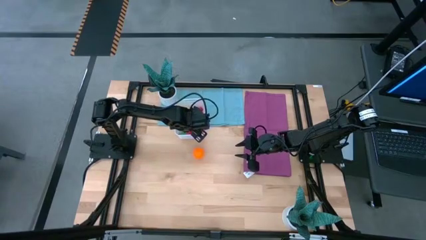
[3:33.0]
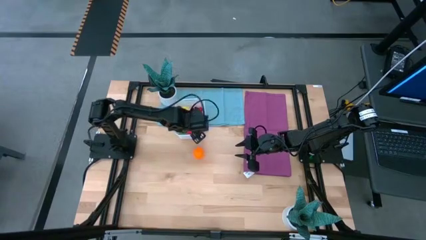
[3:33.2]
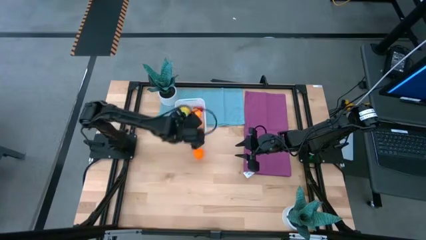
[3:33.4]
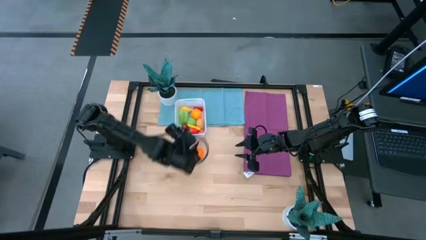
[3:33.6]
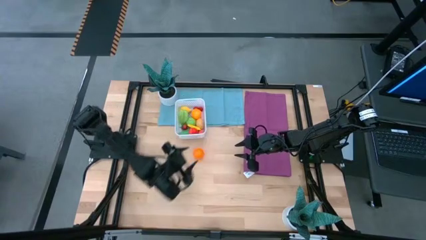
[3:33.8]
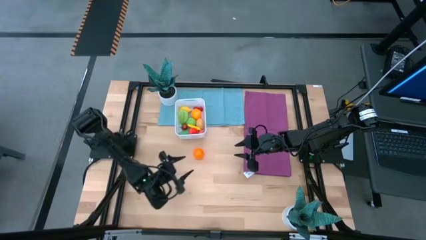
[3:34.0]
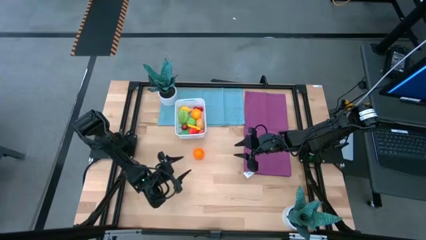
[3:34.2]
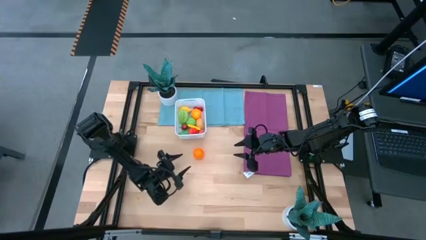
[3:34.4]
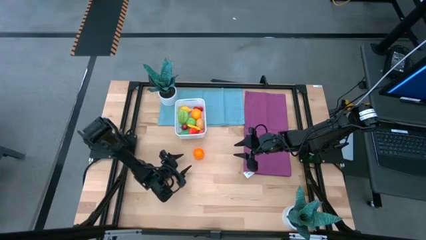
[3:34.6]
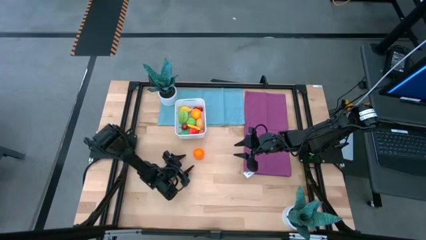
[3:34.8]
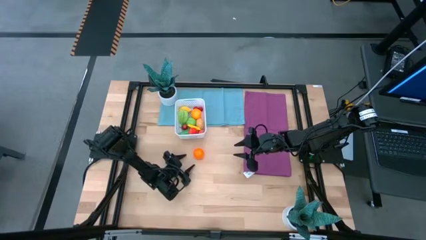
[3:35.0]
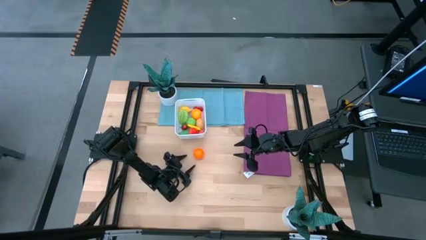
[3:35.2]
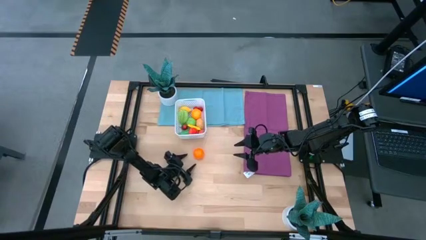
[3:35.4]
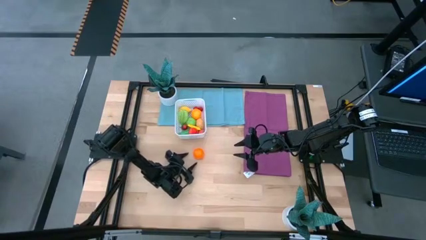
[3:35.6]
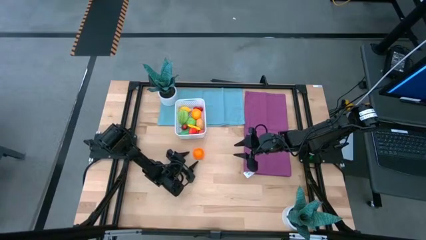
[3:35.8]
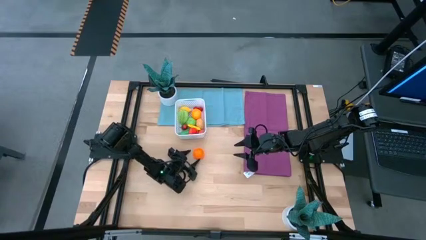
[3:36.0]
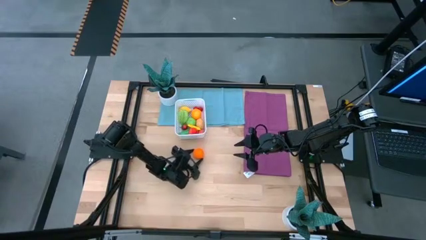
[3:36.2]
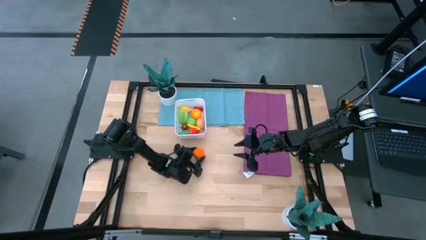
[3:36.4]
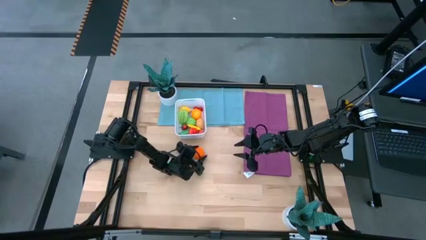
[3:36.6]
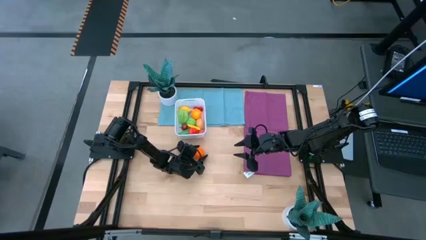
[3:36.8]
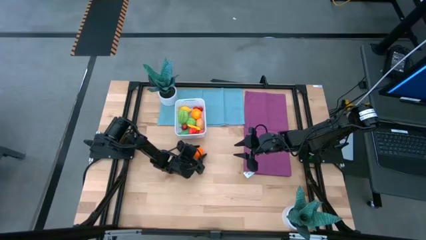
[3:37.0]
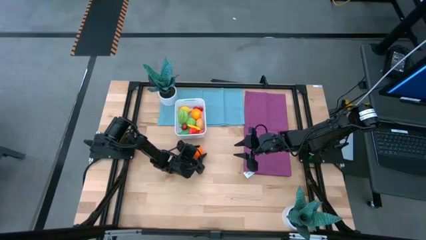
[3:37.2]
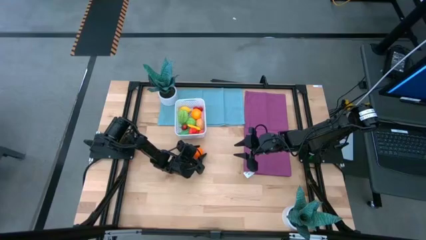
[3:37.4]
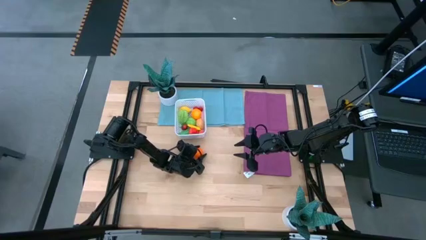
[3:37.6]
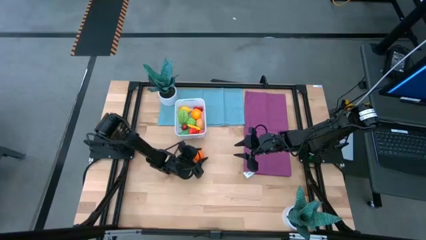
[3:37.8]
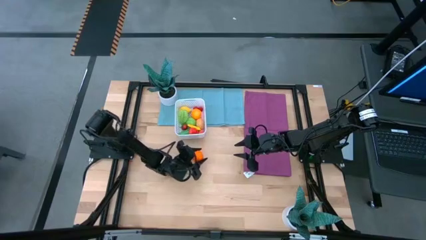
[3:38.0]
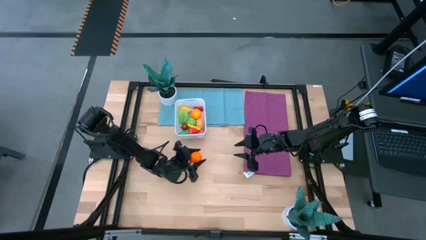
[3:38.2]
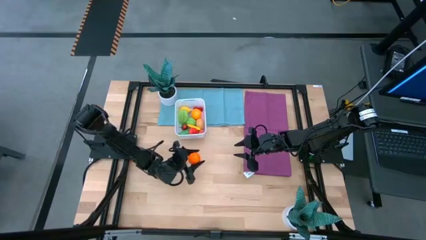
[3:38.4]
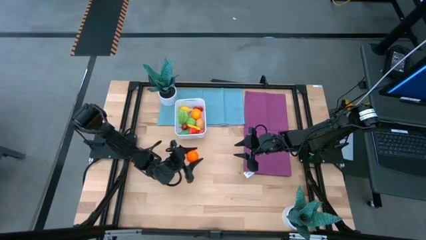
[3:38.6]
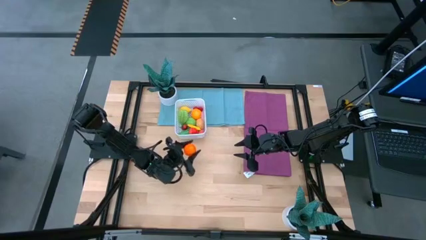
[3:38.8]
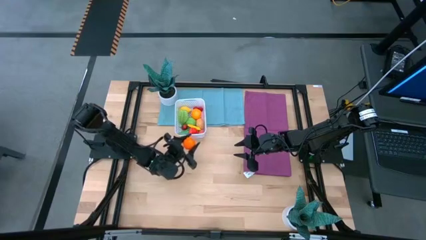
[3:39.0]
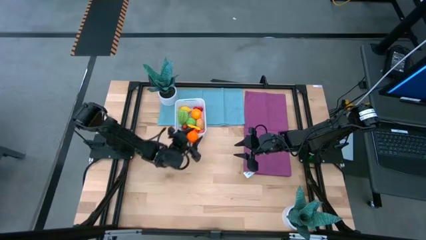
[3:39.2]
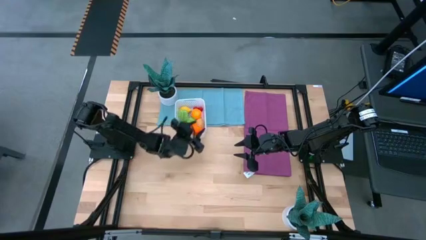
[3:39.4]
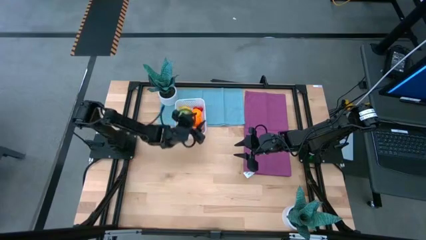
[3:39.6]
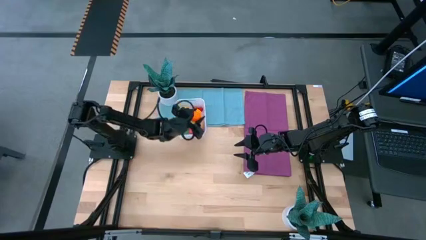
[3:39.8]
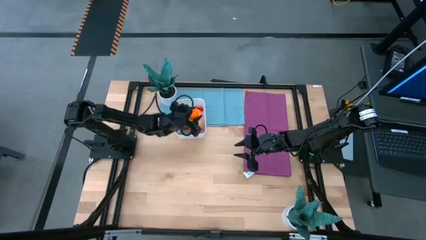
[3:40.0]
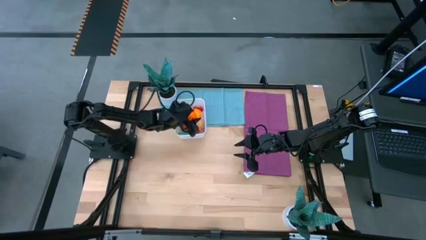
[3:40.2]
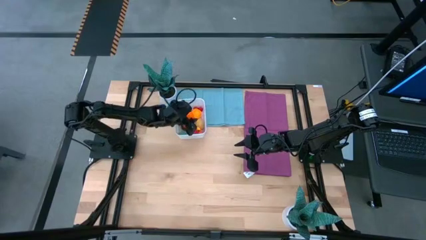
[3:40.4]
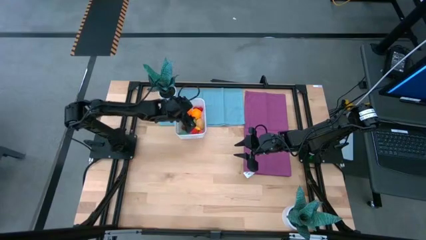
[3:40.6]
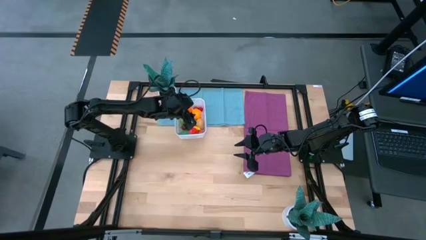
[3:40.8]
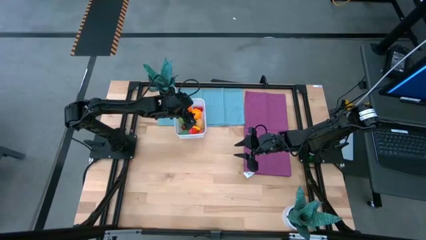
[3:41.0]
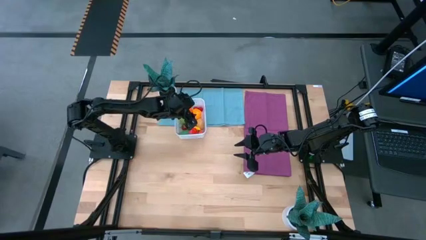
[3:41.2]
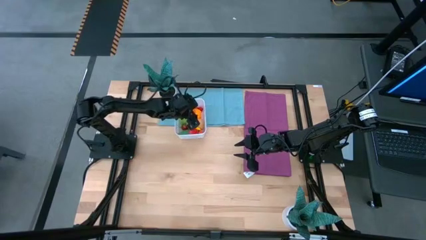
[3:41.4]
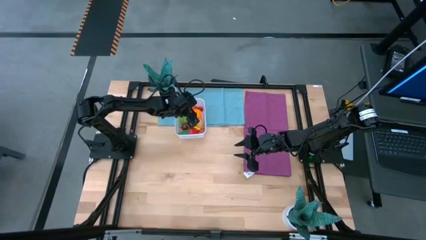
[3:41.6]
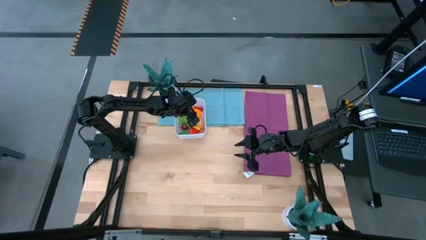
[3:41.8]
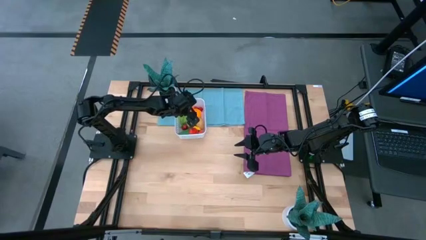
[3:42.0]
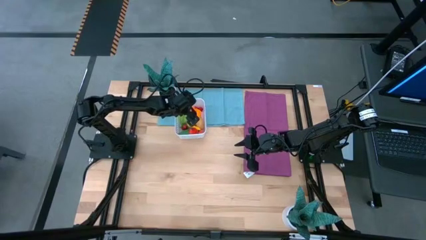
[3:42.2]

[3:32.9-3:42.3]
Task: Pick and placing Produce into tupperware
Put the orange pumpkin into the white basket

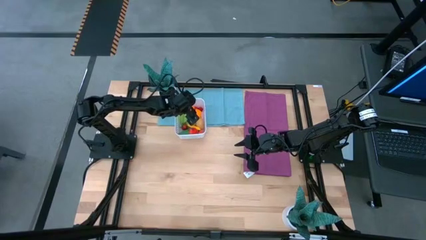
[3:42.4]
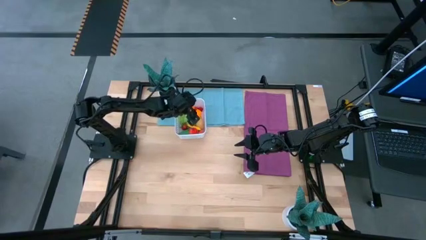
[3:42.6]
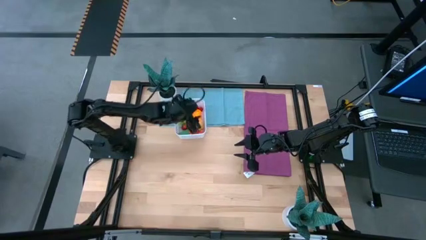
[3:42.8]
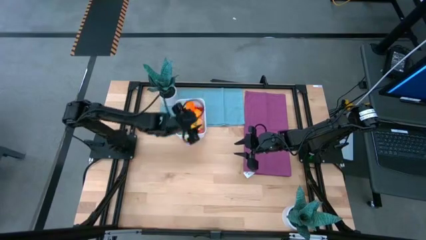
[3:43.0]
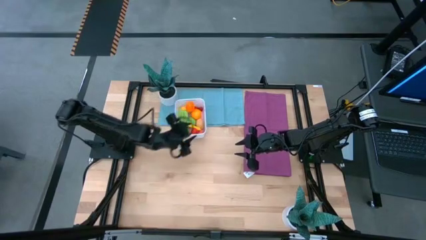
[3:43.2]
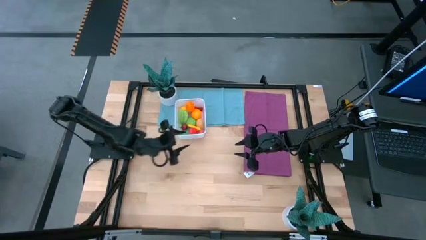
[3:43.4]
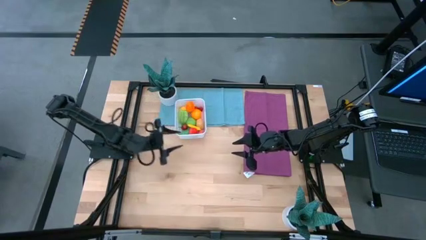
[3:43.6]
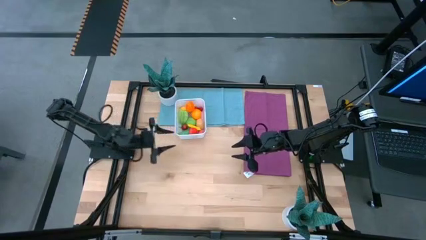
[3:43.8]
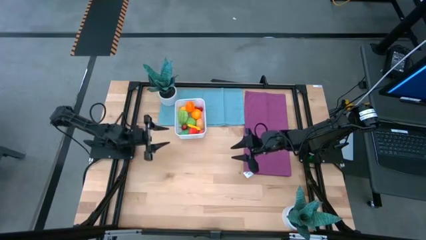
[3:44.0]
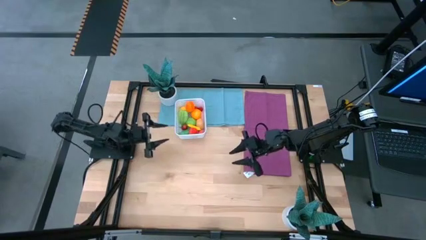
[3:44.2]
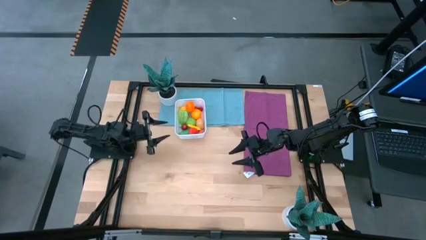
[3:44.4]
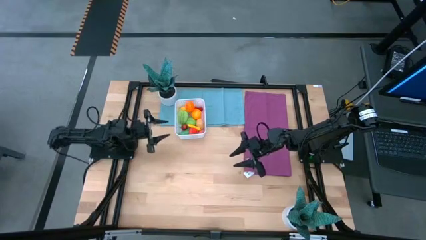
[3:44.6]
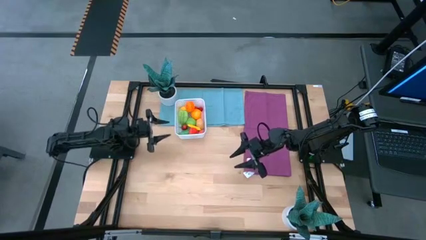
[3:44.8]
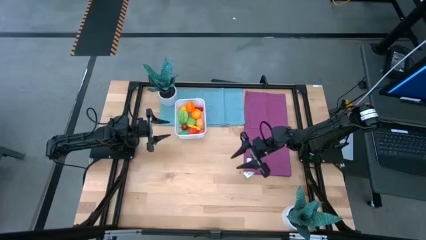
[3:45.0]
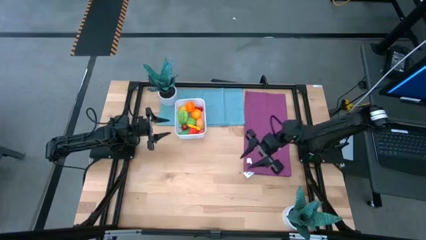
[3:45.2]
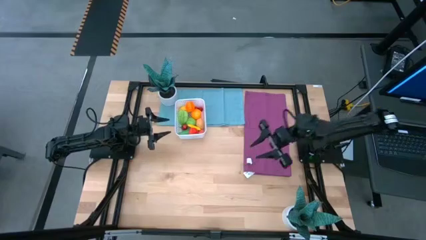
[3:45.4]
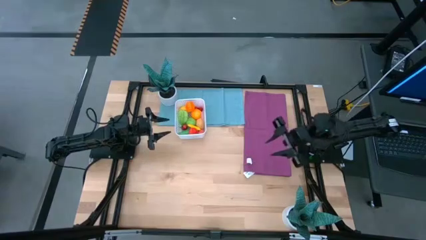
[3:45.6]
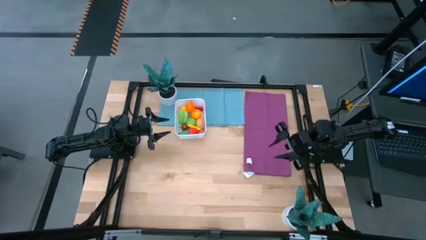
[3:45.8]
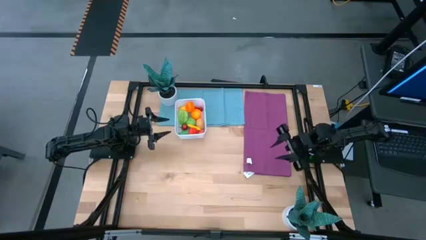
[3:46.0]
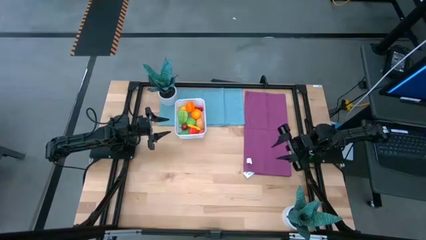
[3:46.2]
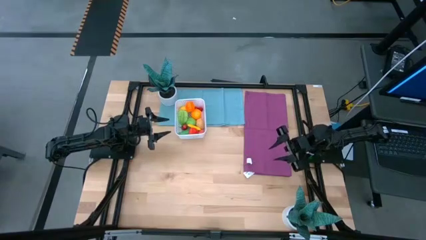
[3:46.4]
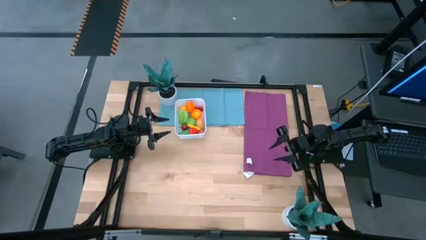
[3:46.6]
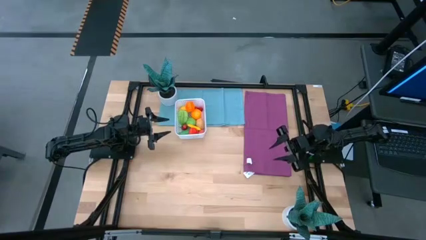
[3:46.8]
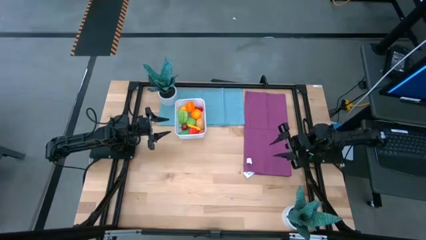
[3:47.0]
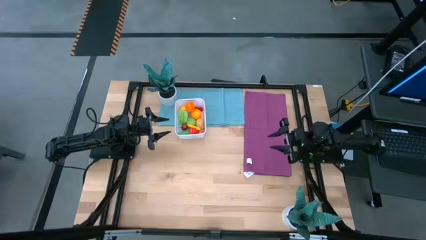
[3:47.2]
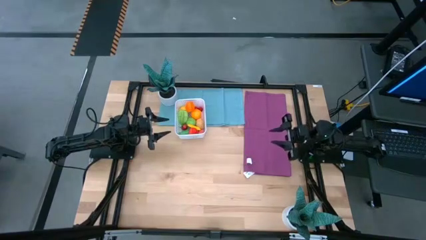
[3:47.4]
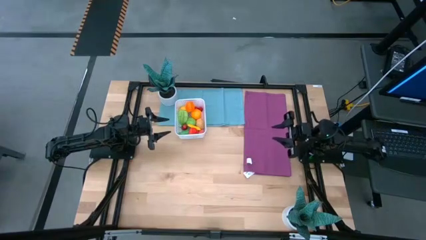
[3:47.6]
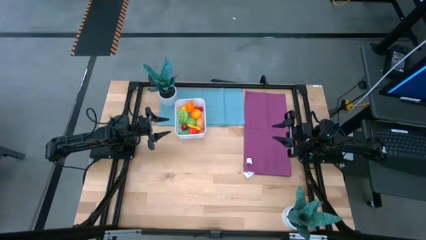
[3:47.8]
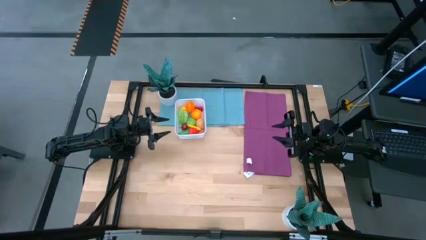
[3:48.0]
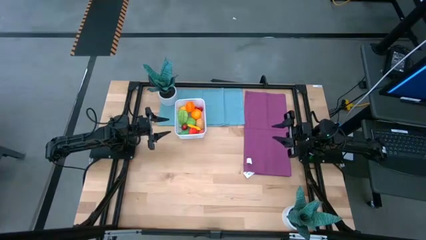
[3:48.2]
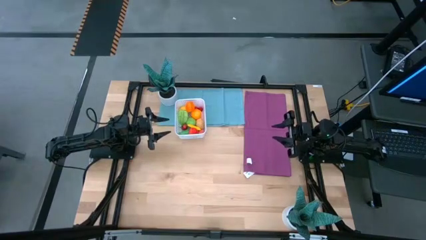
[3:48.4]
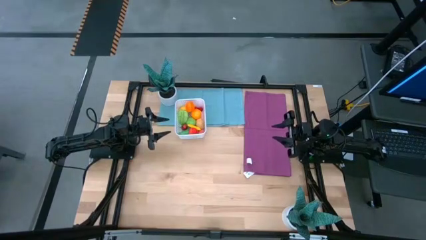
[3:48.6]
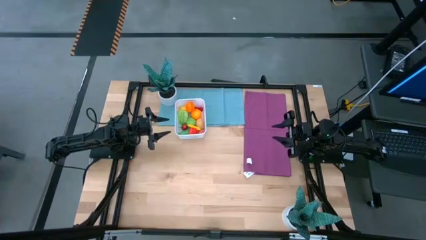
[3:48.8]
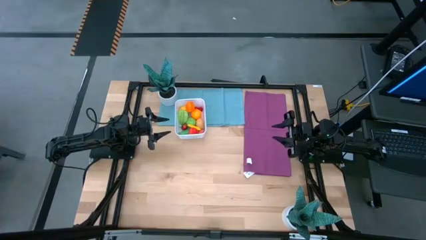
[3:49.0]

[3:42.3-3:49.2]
Return to Home Position

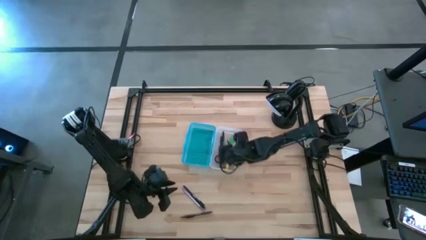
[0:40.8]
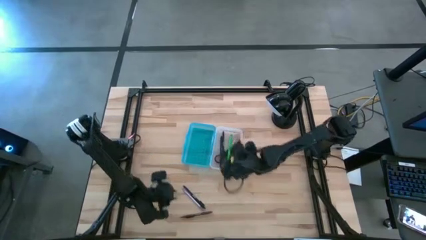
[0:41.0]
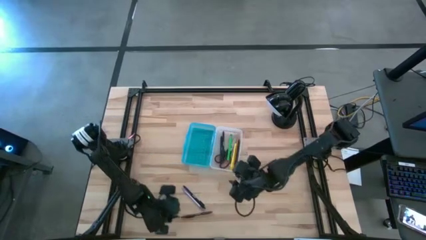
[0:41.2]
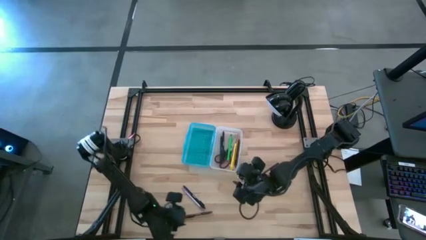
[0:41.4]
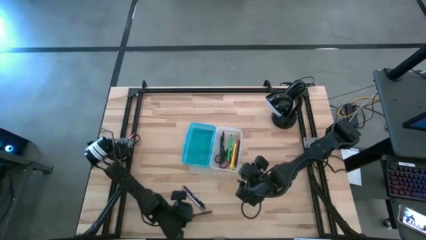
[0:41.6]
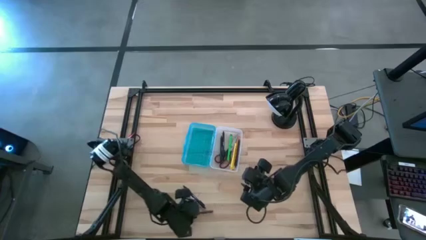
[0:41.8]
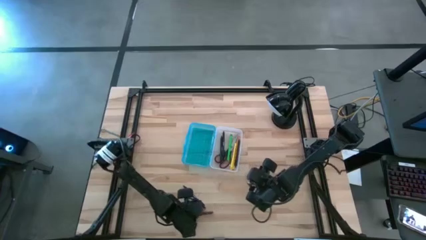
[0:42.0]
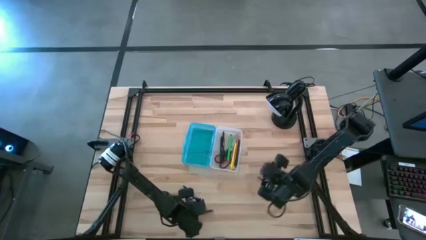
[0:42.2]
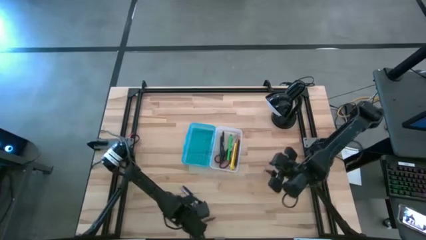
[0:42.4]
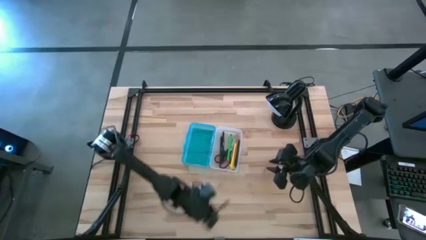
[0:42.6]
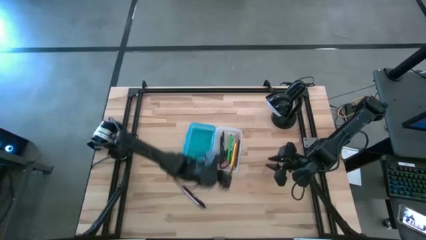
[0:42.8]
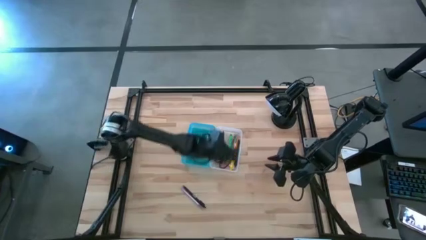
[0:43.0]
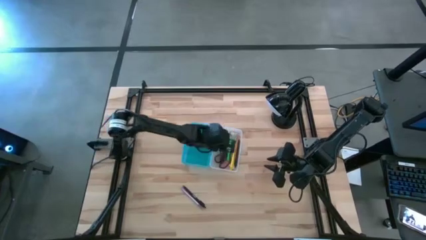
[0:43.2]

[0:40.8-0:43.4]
Task: Pick & place school supplies into a supply box
Put the brown pen into the supply box
